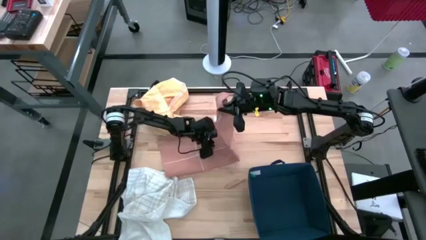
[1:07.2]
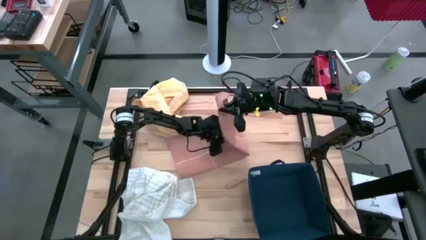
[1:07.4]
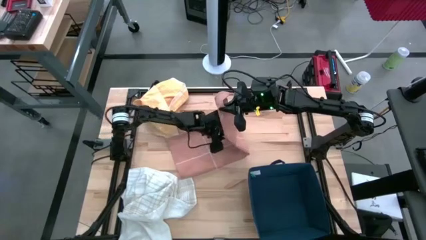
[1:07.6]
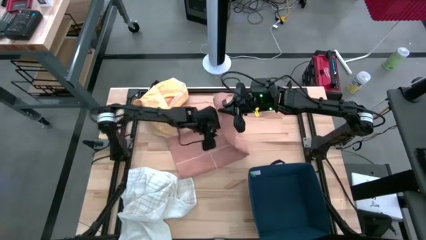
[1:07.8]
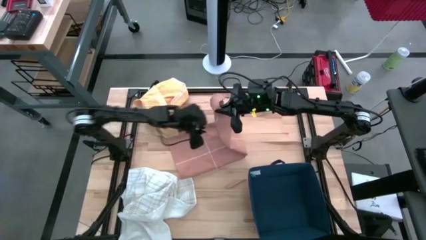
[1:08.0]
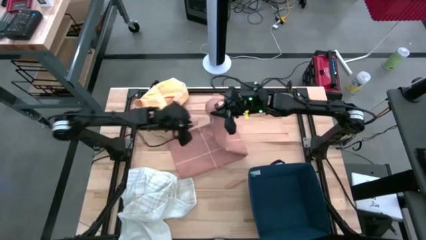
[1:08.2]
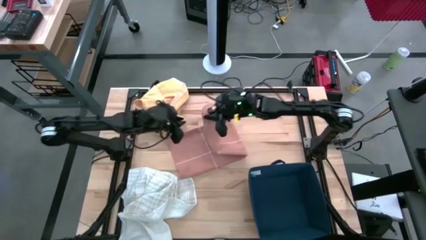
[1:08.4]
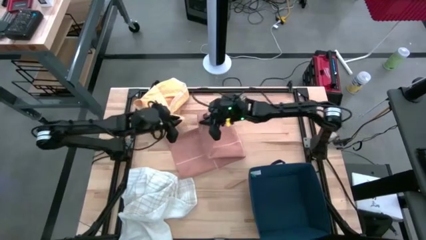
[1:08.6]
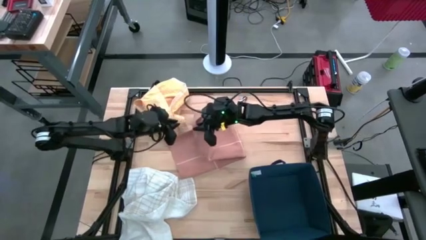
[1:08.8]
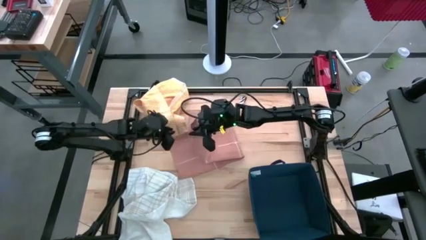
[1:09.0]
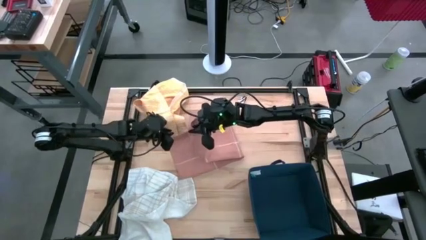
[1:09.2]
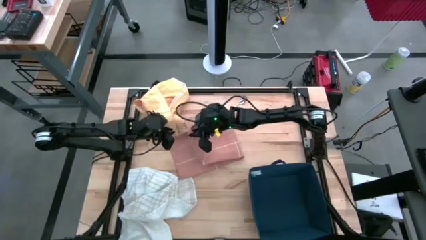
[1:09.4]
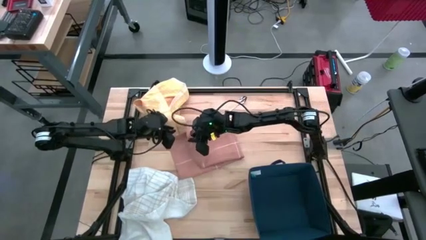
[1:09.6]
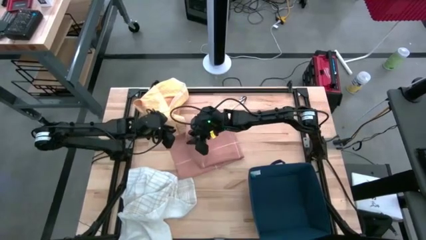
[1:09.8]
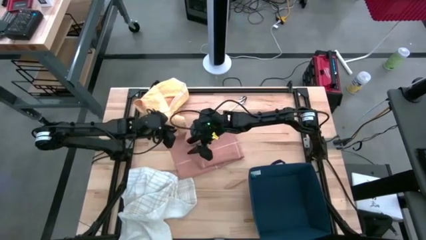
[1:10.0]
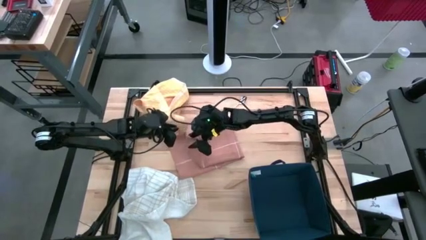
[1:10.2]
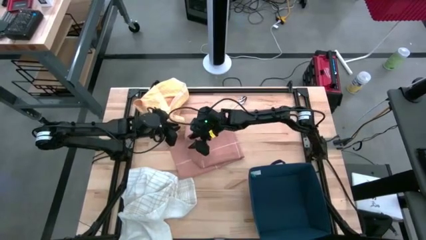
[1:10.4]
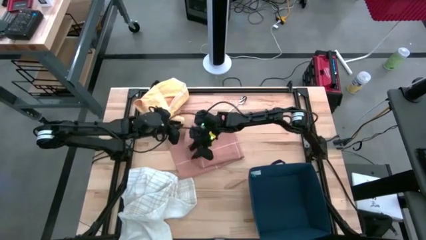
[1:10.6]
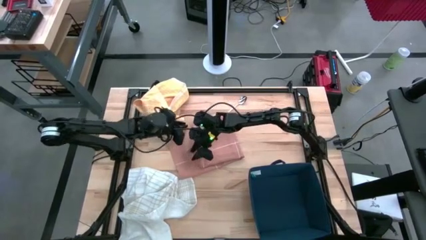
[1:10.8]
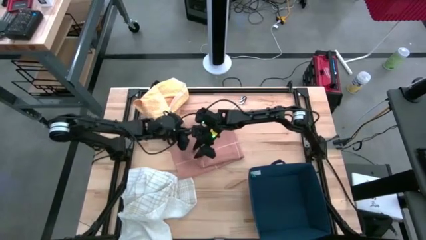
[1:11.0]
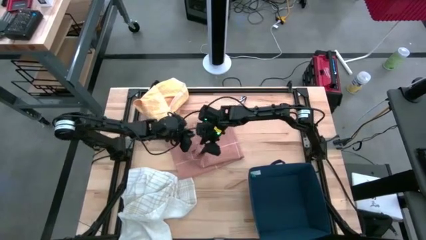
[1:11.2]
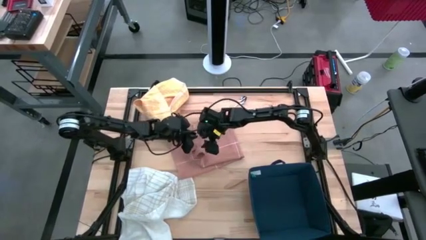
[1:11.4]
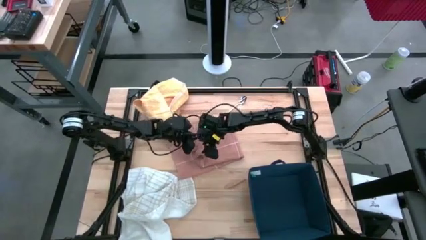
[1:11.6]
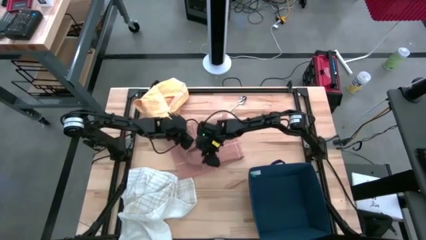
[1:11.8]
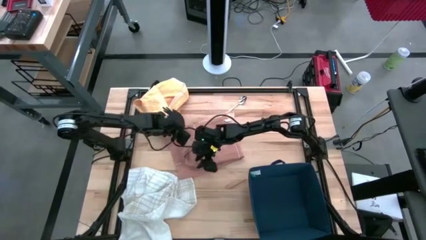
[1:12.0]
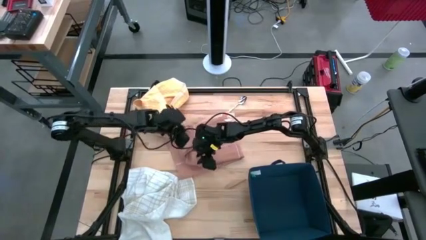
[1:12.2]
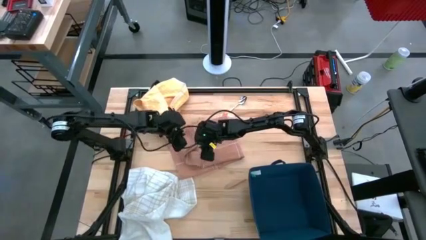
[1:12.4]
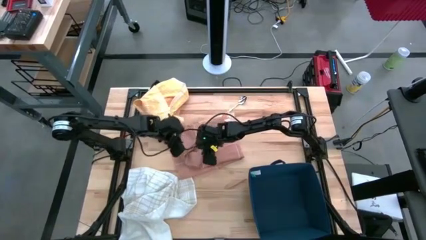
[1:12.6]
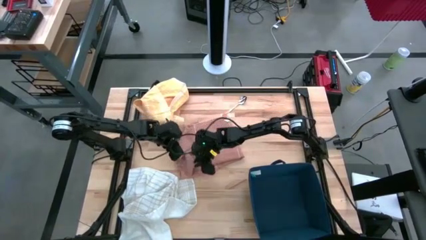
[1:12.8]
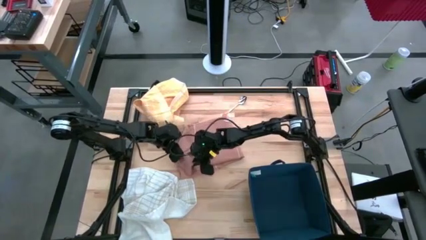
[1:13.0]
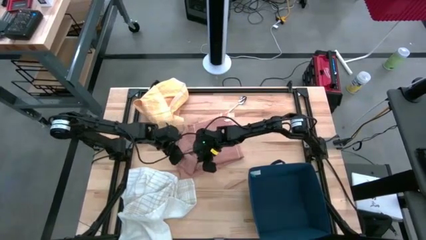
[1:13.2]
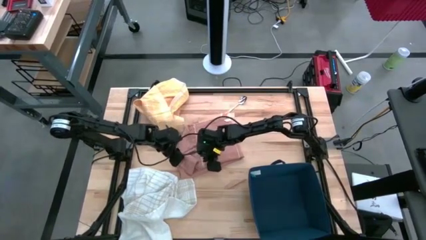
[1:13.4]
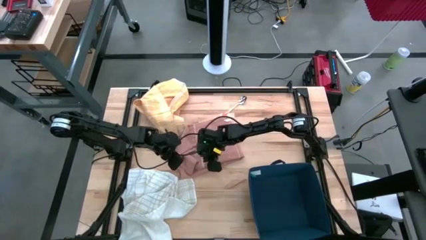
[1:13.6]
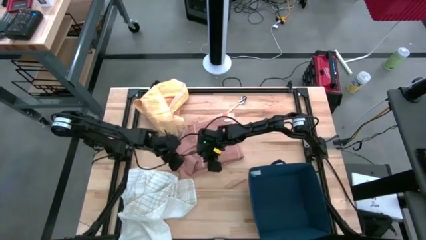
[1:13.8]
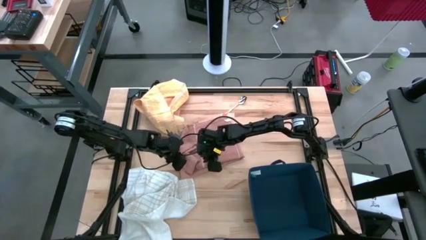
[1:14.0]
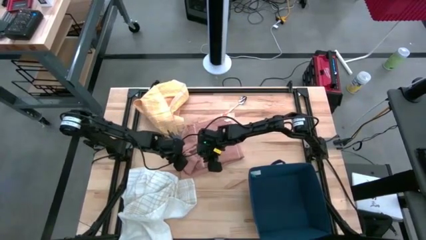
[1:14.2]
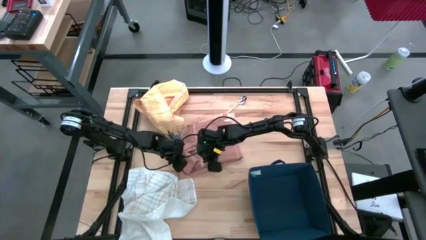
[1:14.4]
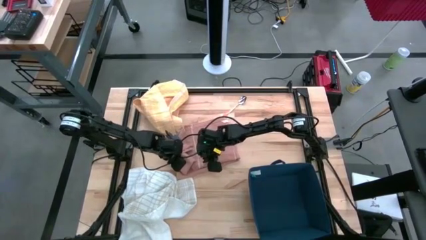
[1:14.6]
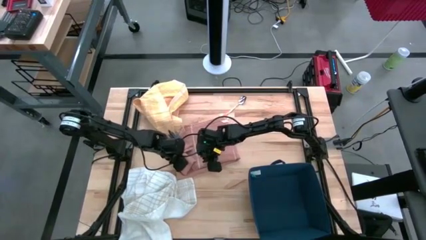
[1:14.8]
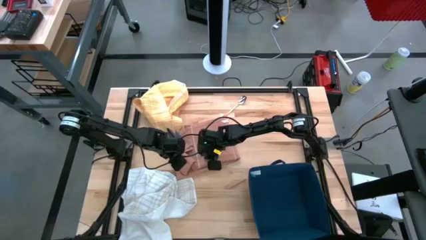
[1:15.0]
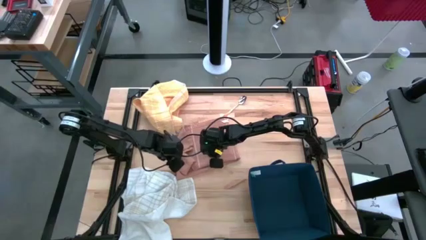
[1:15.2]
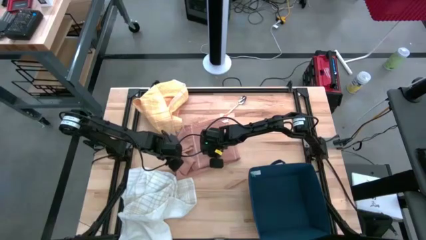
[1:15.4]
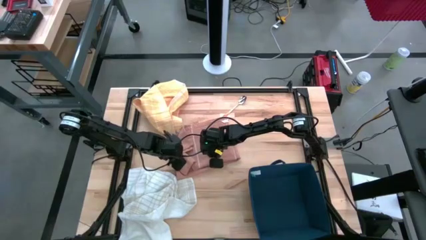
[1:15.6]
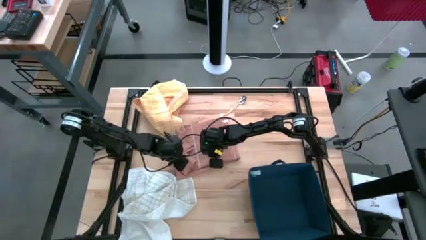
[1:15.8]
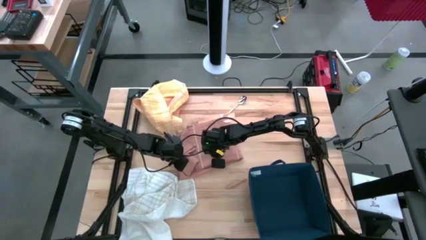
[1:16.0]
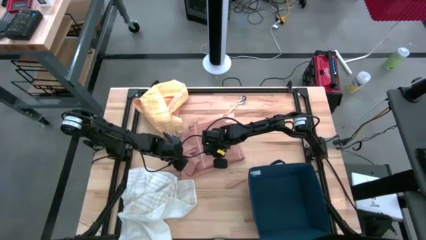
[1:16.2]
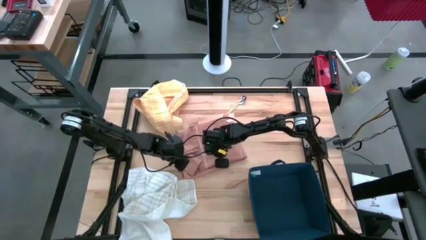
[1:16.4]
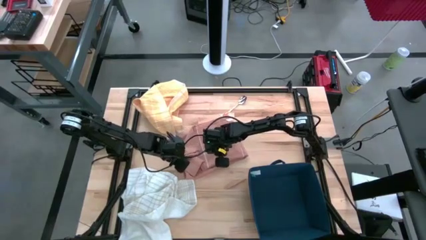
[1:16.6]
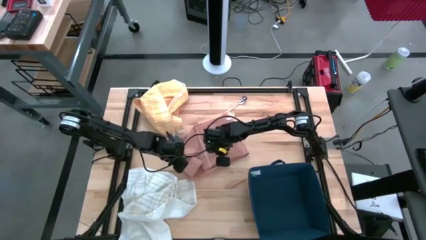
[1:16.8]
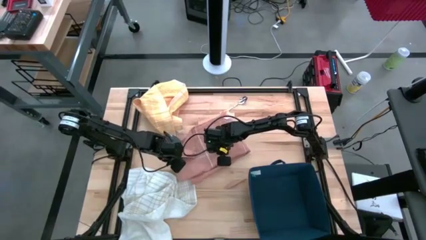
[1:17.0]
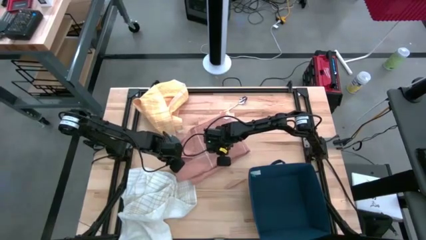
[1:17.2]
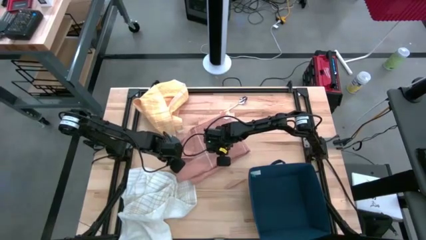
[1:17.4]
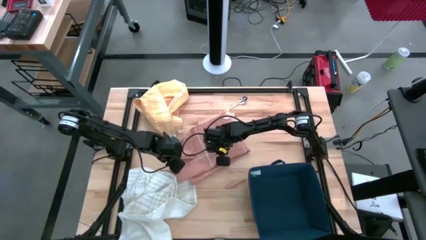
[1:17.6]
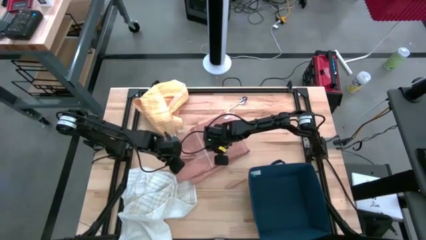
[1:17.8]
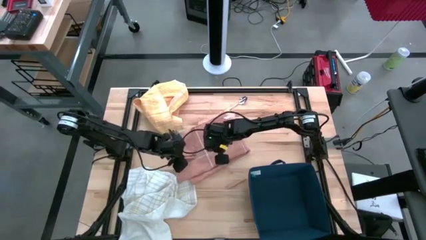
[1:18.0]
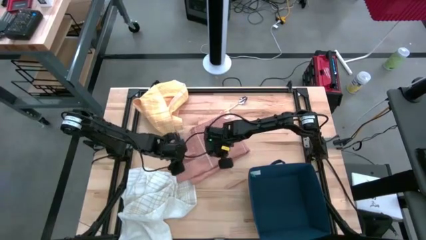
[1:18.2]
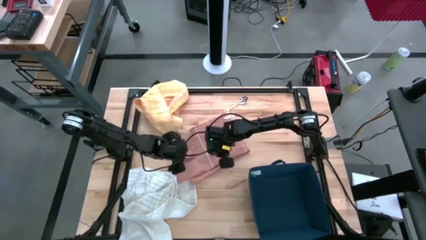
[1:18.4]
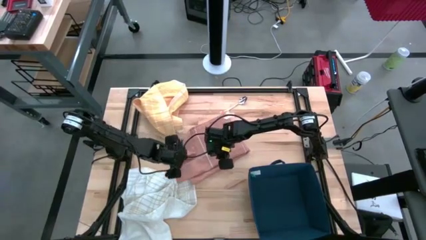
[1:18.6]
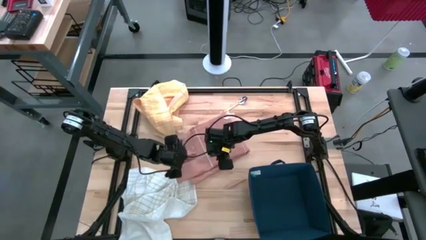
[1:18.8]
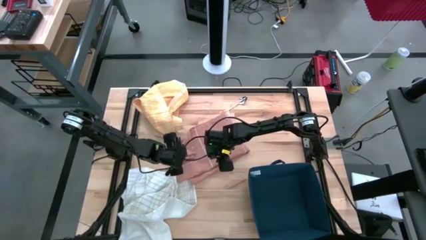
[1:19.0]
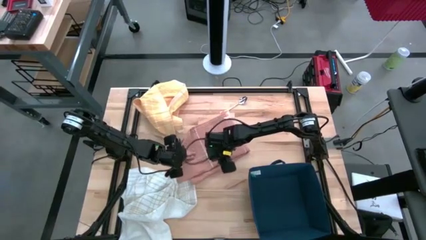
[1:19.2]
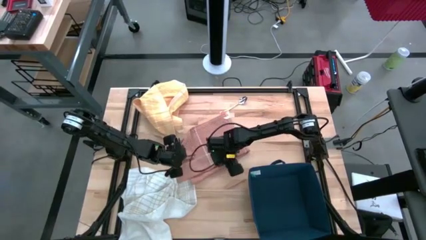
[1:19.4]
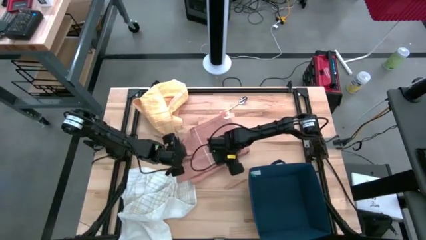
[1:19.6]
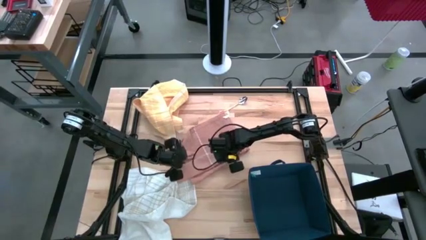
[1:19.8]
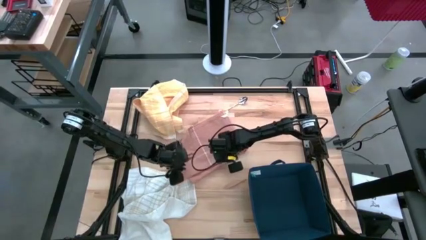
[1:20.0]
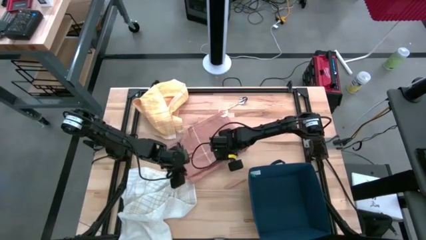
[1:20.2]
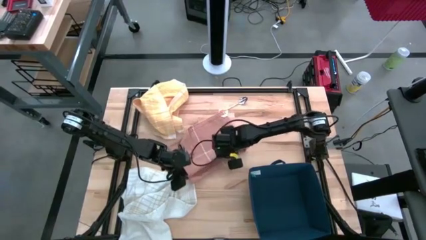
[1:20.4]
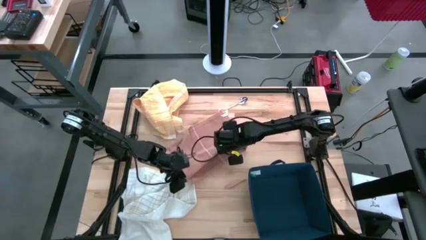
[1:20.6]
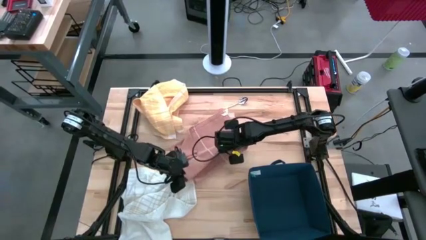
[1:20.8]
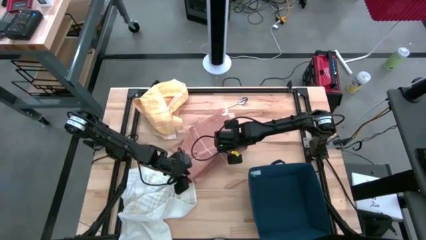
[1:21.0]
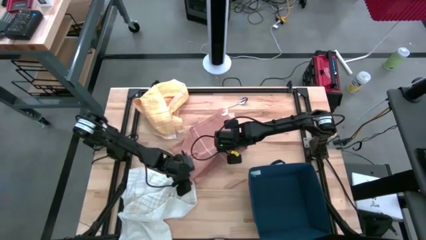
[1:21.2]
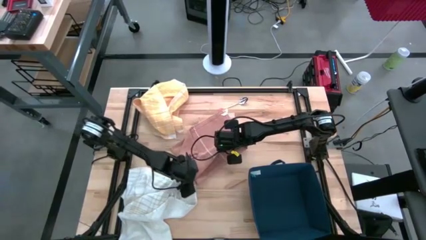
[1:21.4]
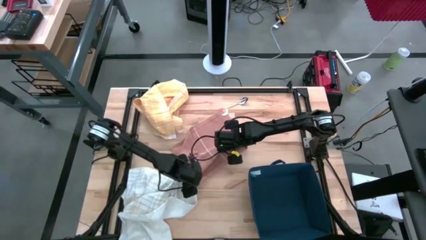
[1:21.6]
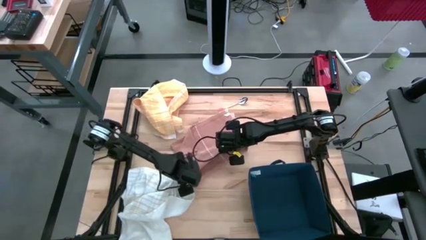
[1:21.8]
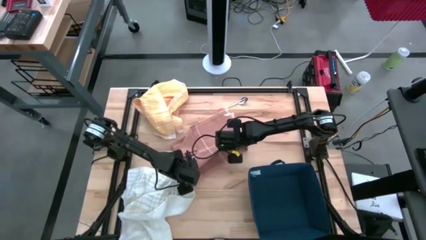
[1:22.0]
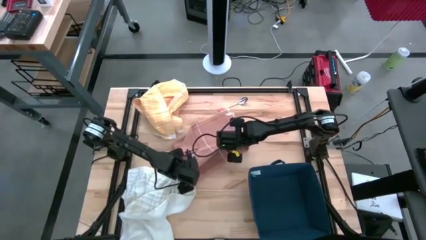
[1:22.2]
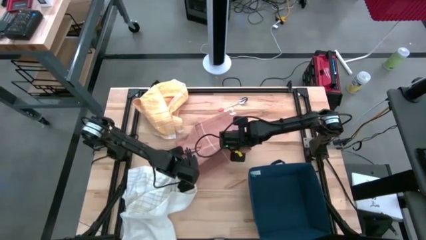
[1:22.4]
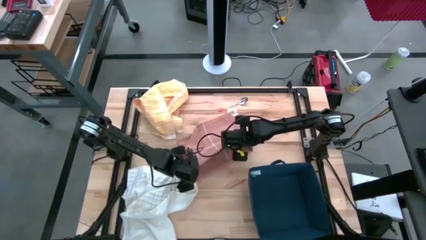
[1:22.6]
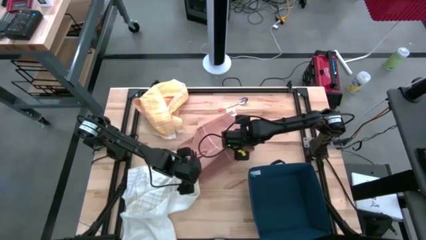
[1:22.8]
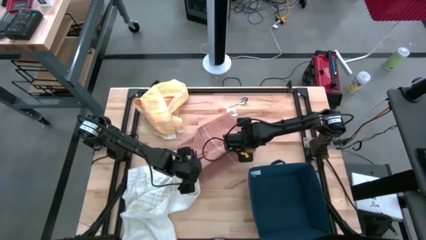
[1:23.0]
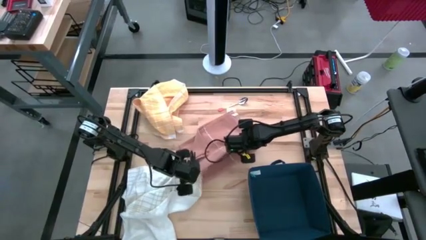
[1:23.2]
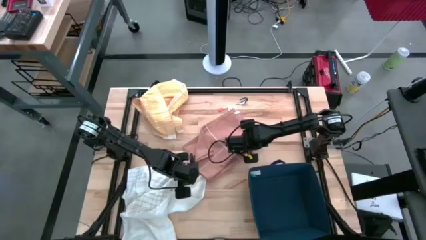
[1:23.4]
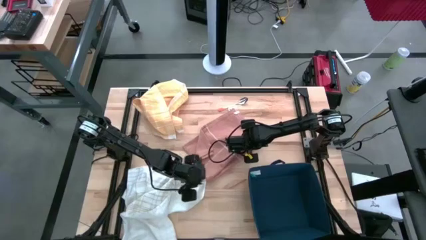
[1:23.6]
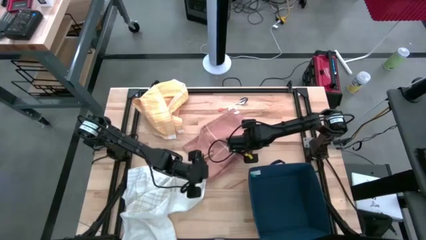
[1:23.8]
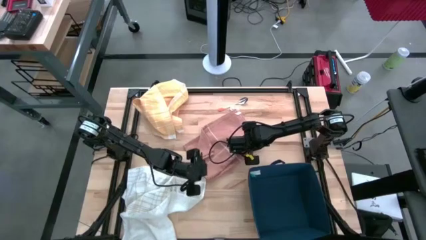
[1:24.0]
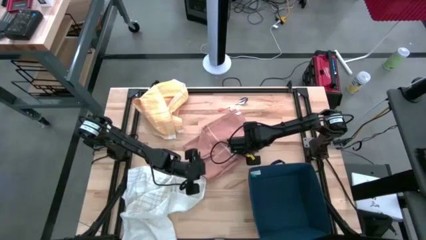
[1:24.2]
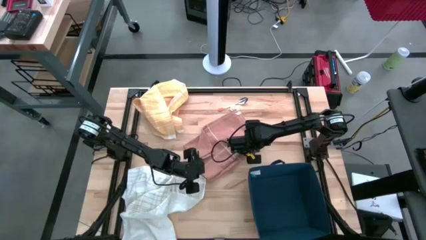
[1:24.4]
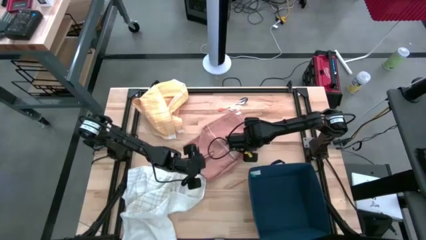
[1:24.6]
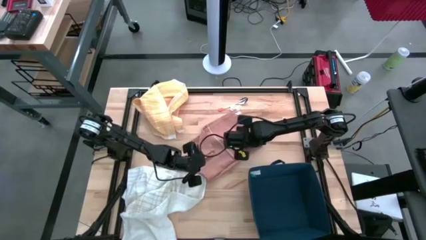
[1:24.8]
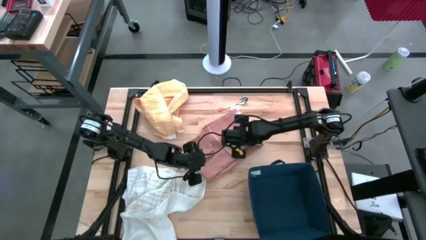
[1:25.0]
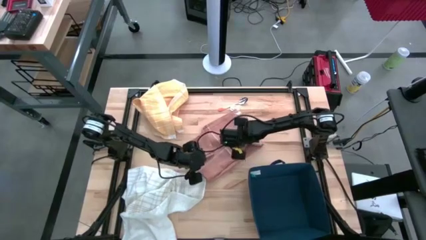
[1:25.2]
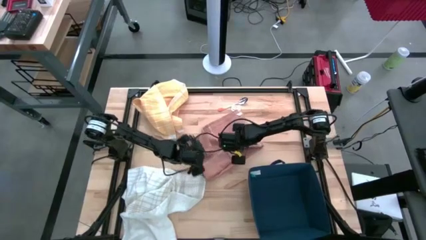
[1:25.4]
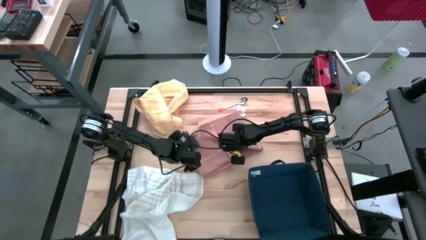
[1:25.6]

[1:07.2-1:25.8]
Task: Fold towel
Fold the brown towel
